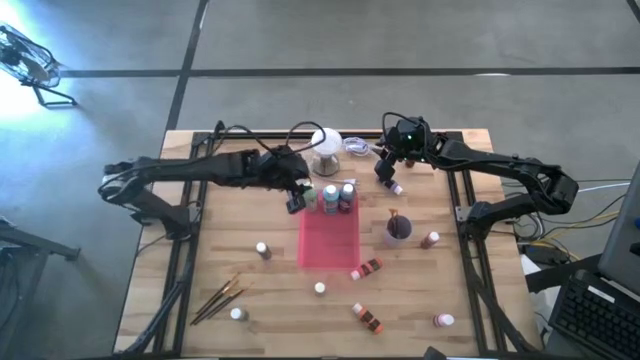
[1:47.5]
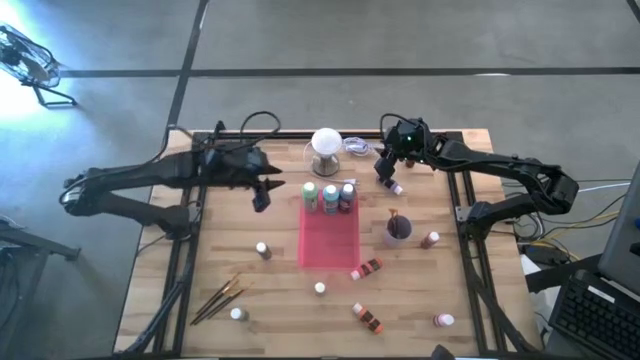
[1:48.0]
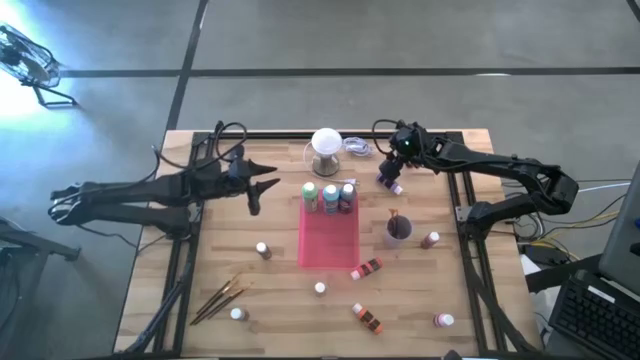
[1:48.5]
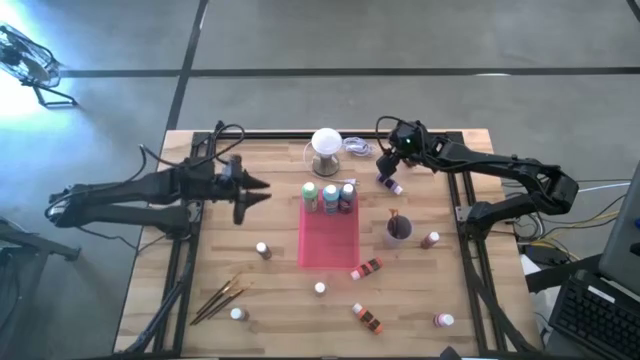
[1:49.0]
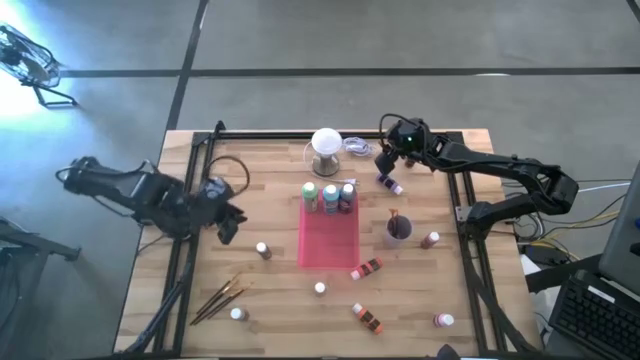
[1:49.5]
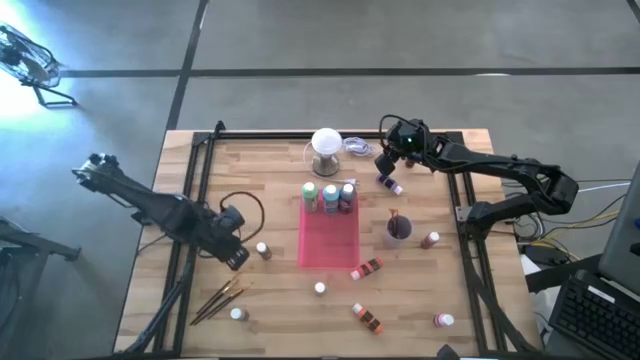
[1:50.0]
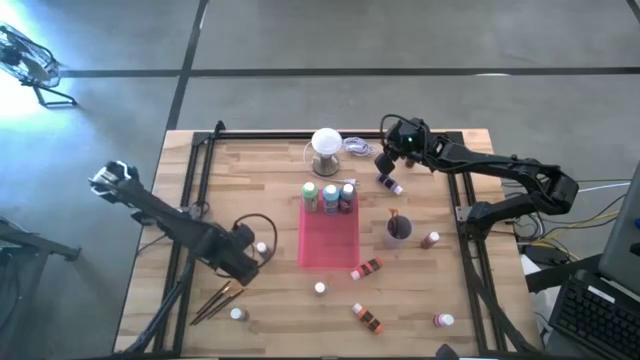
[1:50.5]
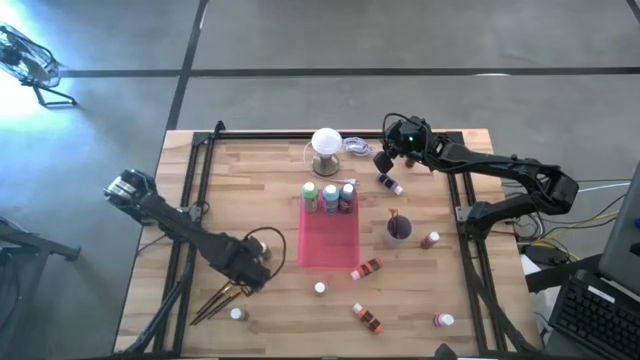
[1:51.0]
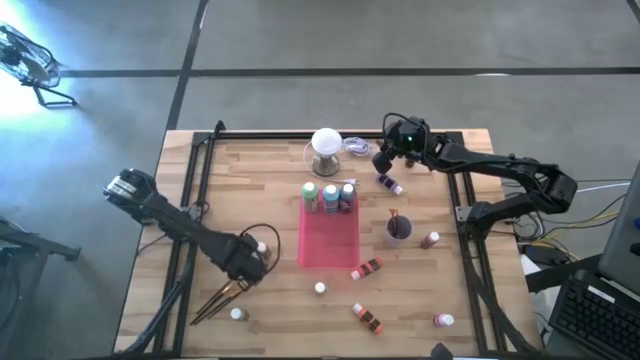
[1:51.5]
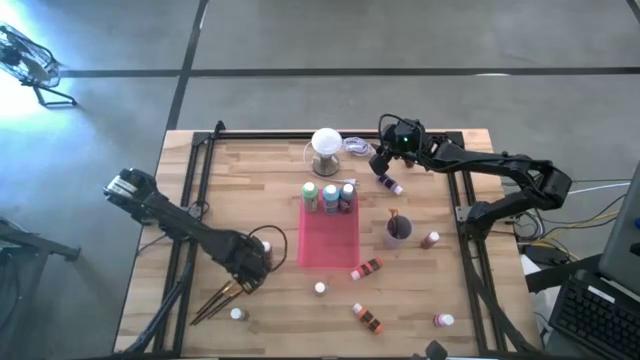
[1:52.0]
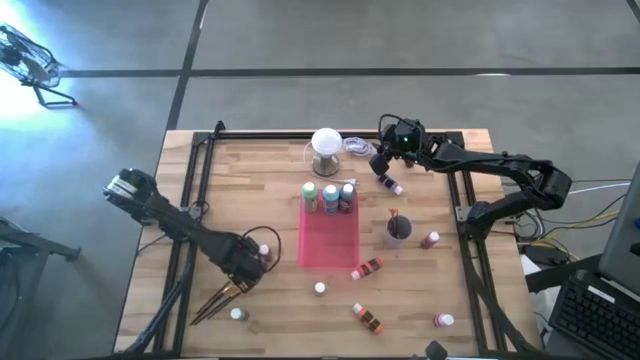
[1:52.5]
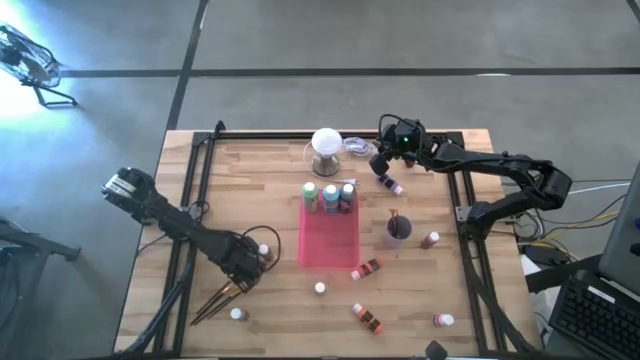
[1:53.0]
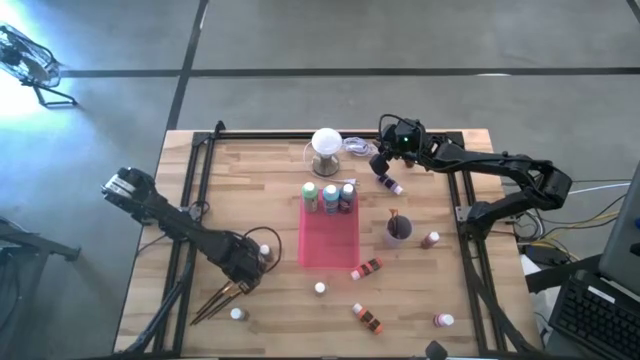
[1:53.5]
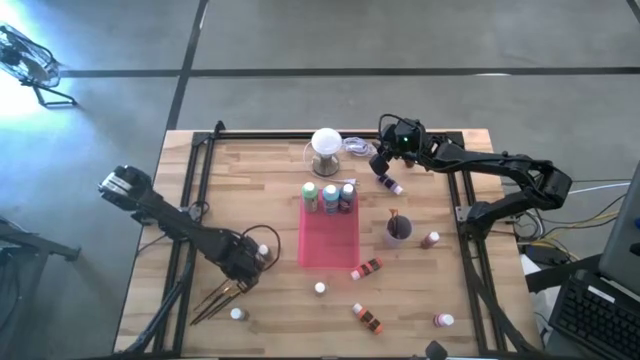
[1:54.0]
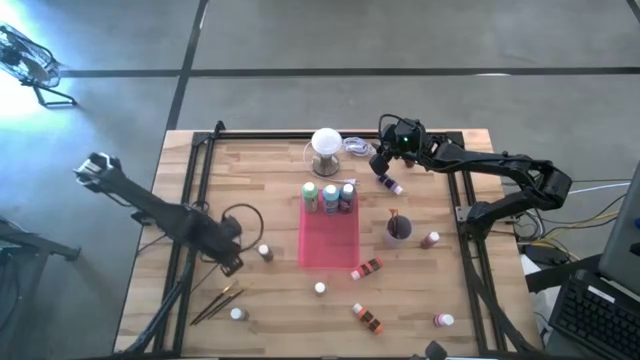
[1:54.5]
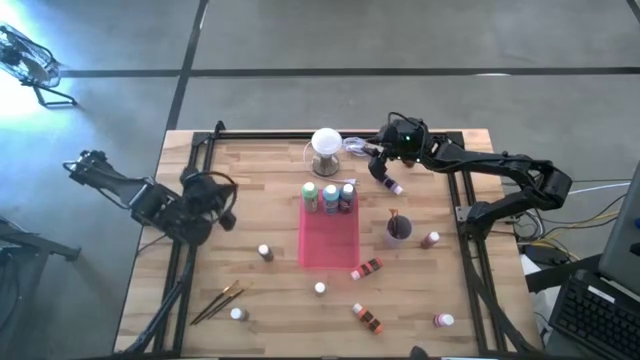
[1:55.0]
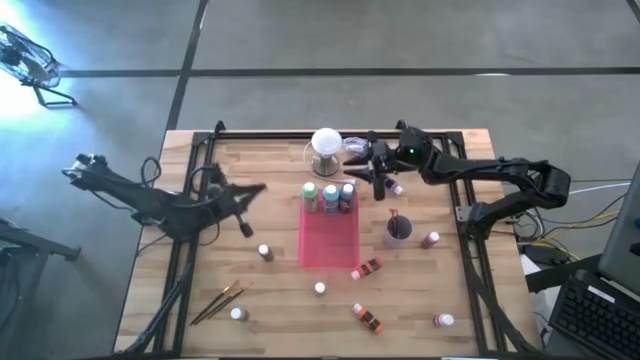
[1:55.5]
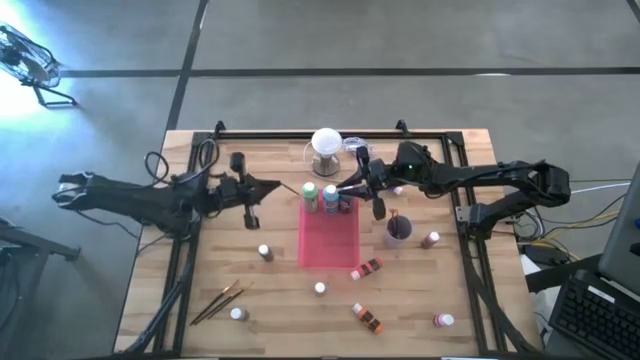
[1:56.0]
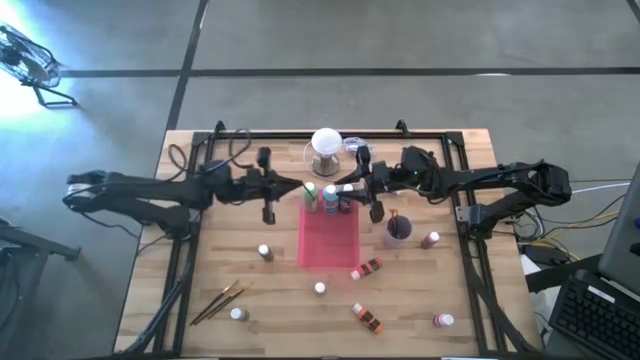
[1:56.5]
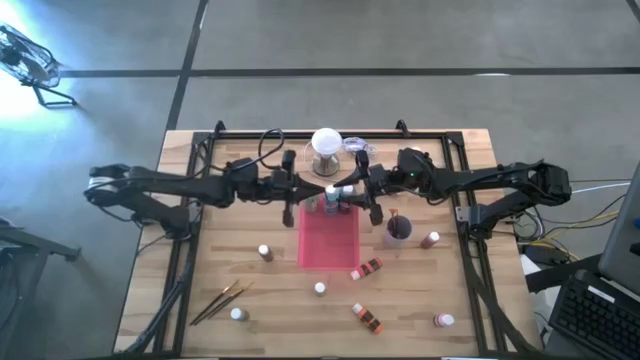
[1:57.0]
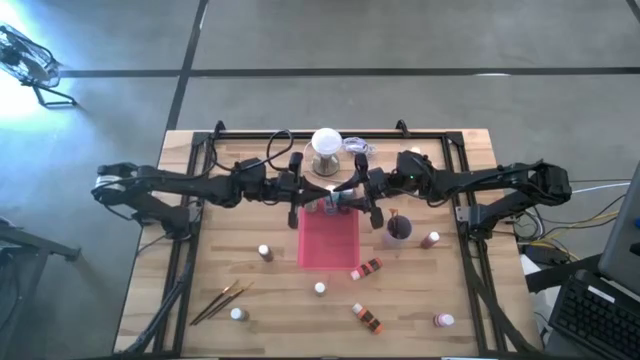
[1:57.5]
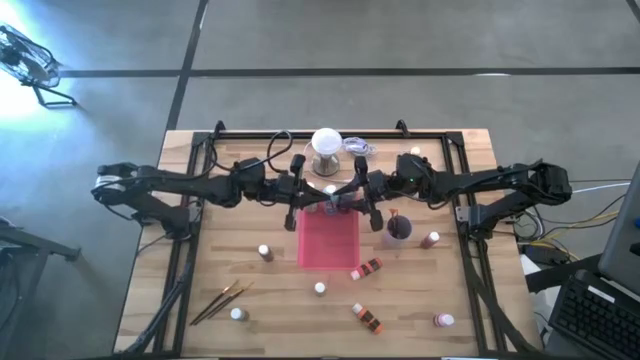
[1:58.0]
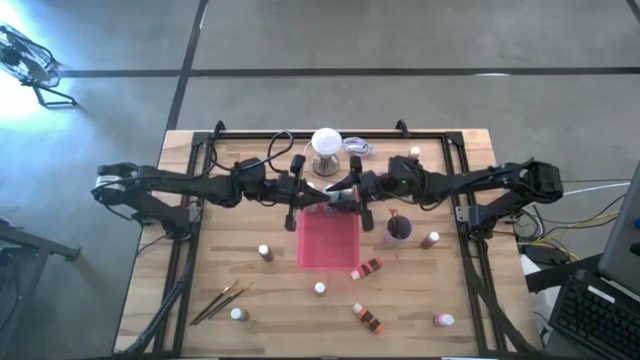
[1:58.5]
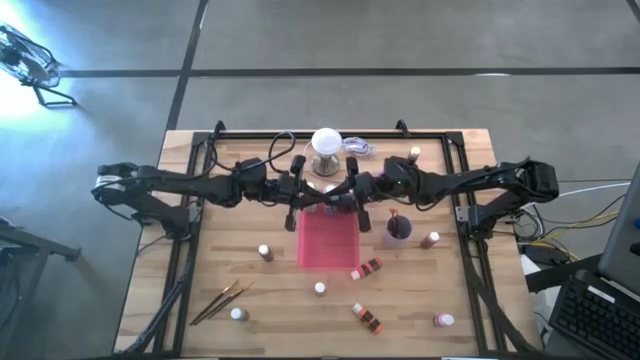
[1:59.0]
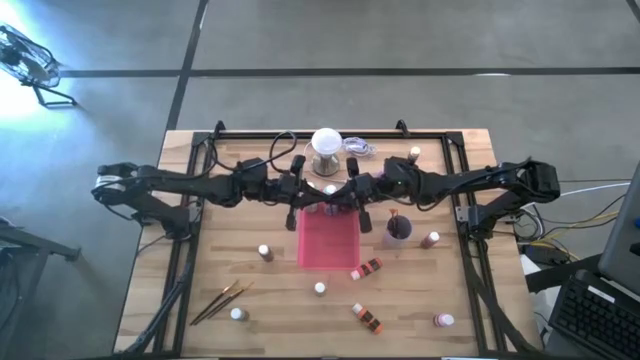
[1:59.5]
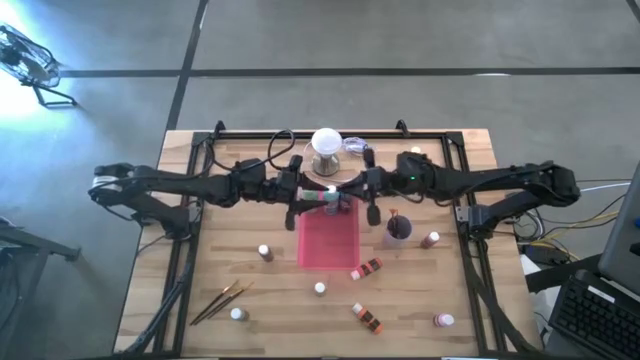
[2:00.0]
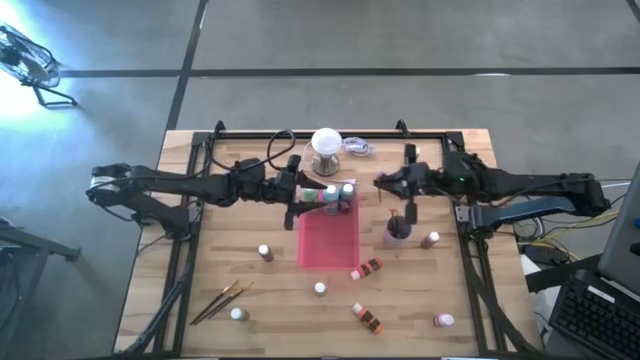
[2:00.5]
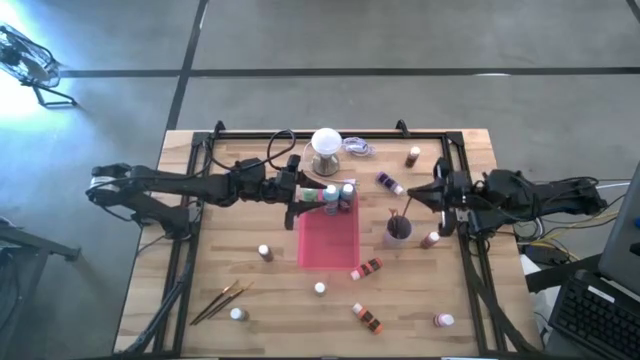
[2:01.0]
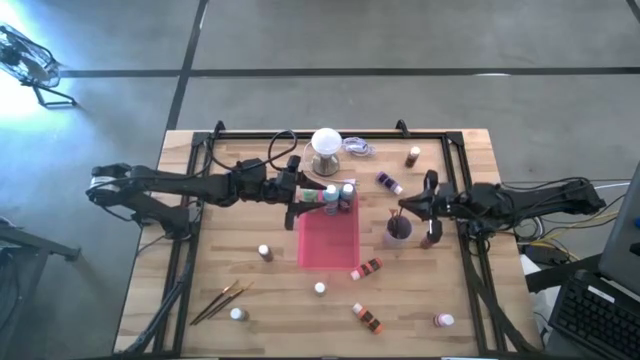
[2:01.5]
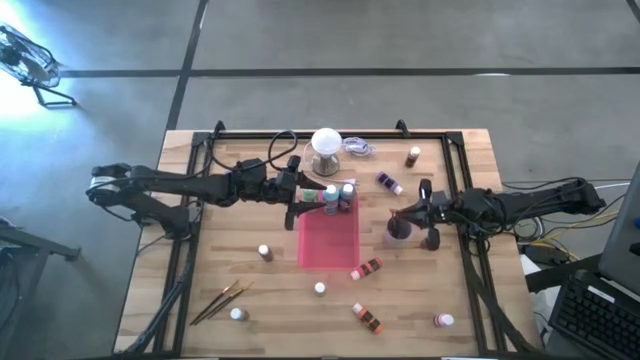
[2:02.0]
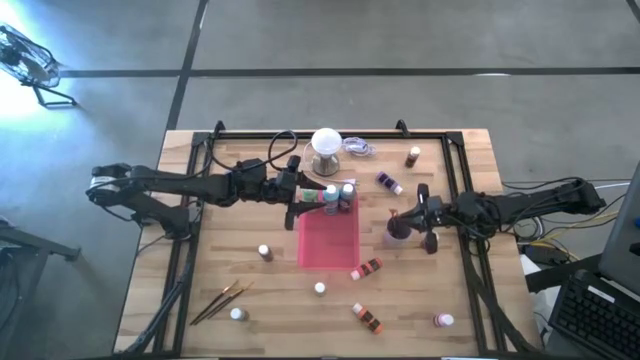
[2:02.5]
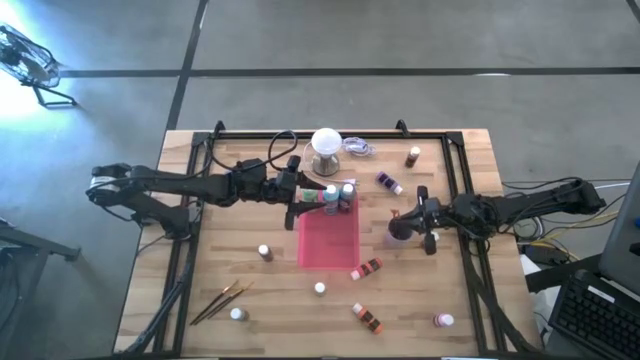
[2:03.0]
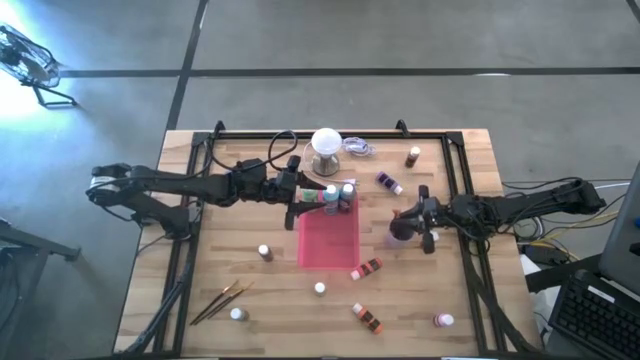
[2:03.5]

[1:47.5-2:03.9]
Task: Pick & Place Paint Supplies
Put the orange paintbrush into the purple cup

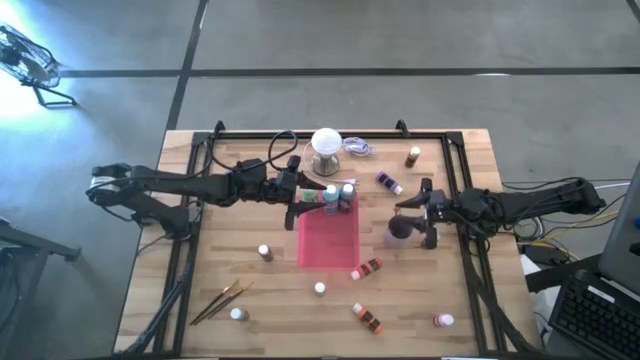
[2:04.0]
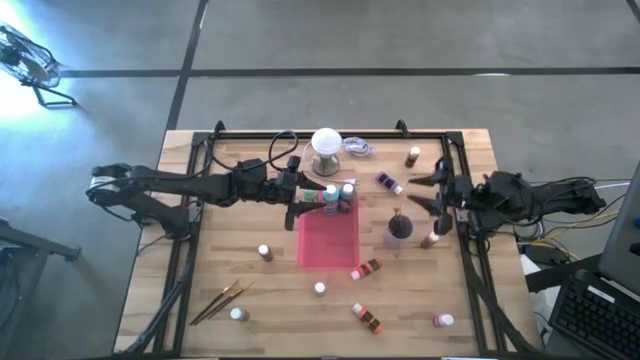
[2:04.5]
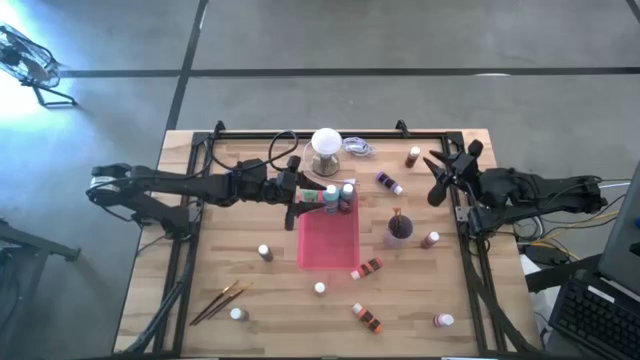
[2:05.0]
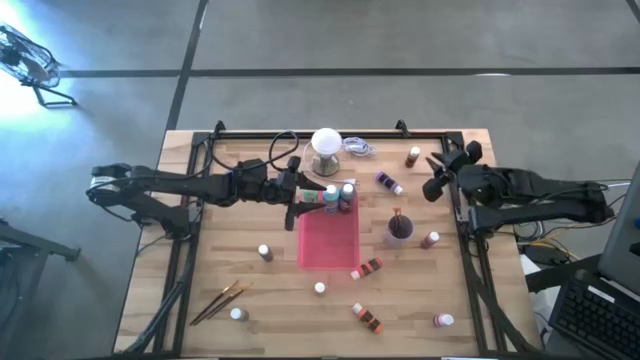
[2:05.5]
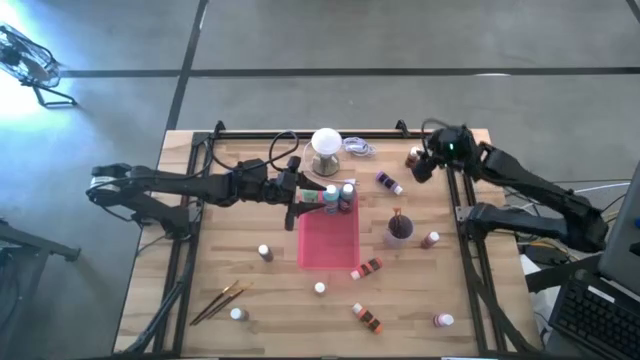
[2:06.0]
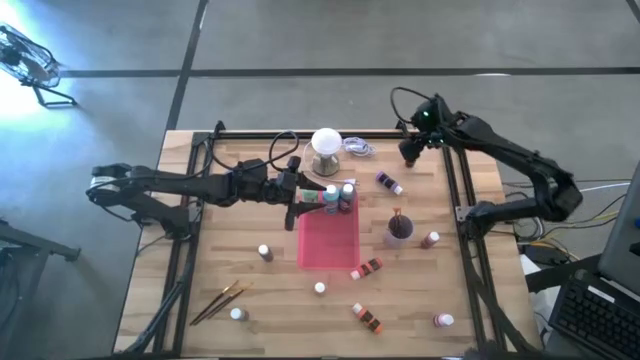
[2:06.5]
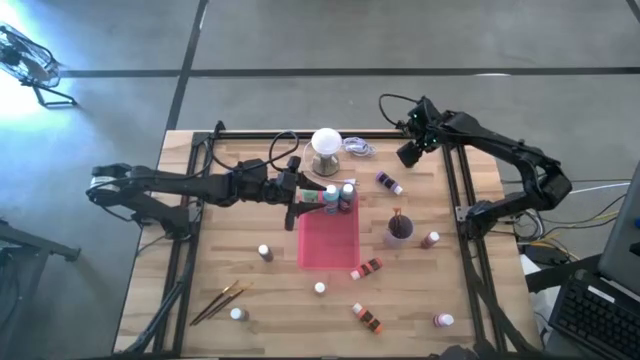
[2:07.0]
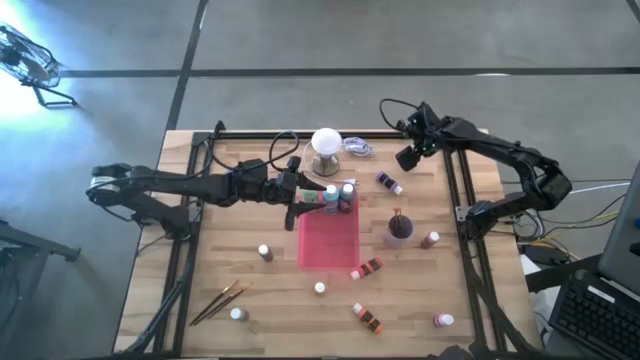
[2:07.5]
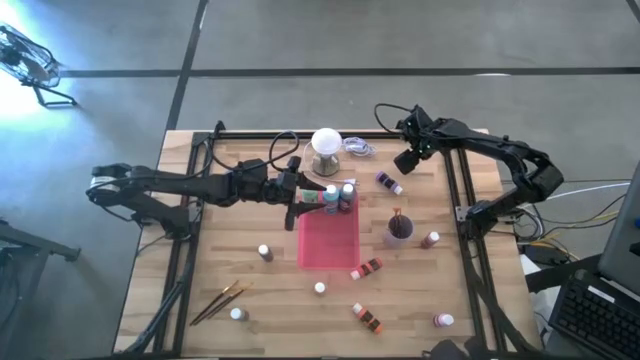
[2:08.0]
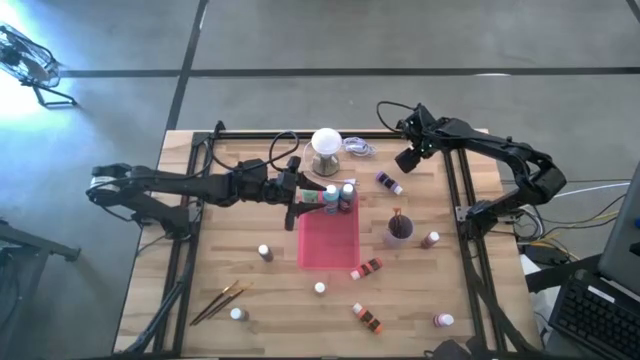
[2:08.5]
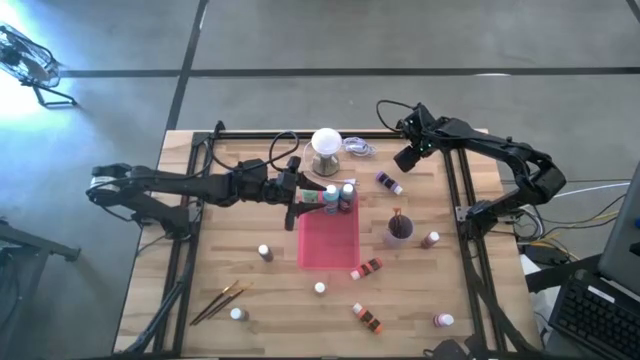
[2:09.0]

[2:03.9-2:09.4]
Put the small red paint bottle into the red bin
